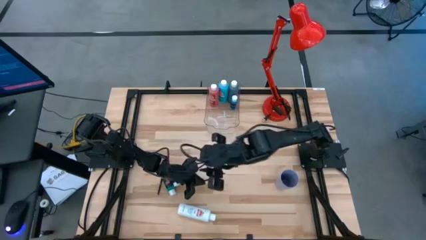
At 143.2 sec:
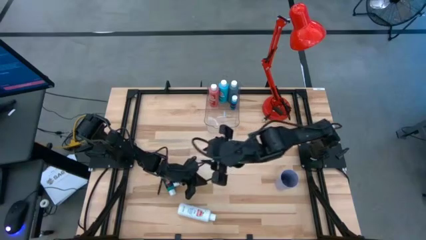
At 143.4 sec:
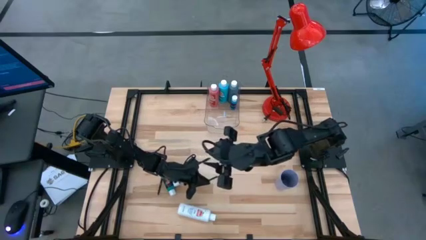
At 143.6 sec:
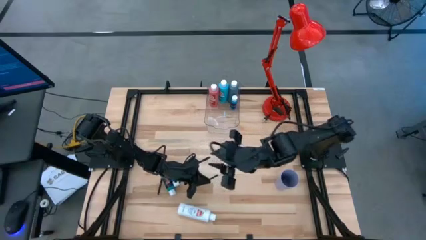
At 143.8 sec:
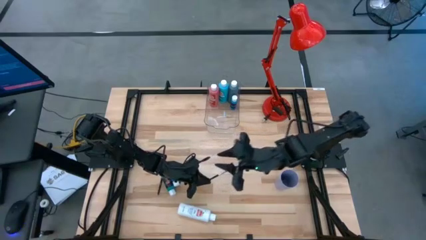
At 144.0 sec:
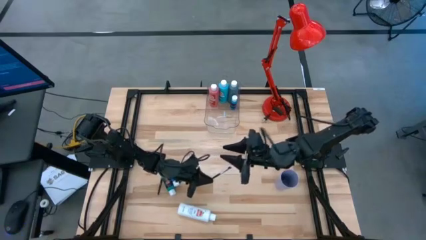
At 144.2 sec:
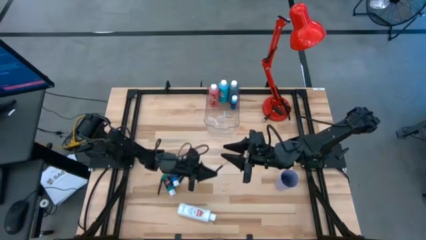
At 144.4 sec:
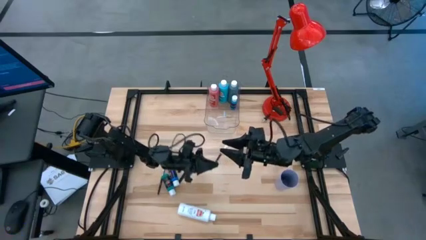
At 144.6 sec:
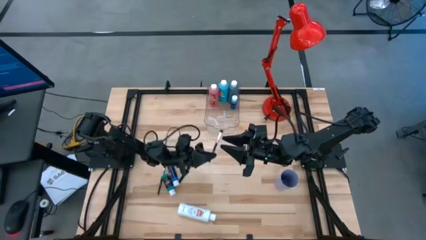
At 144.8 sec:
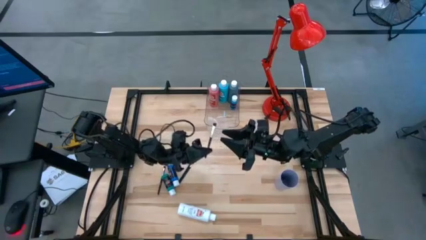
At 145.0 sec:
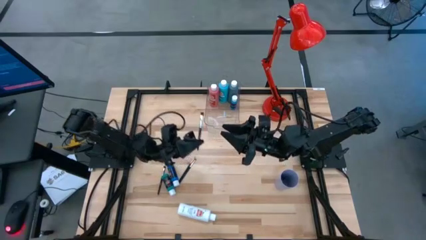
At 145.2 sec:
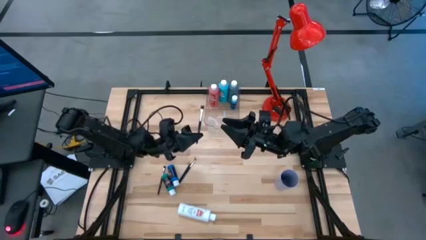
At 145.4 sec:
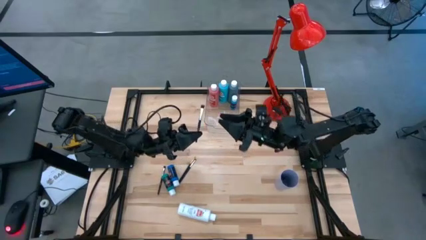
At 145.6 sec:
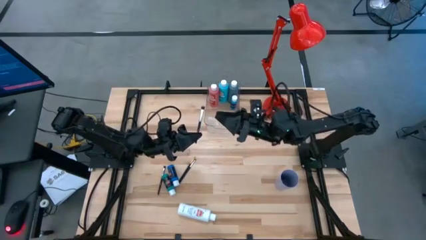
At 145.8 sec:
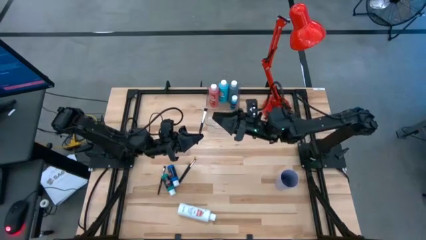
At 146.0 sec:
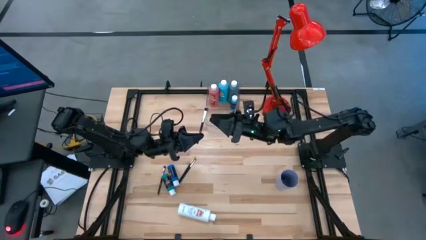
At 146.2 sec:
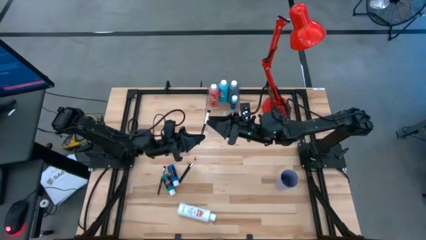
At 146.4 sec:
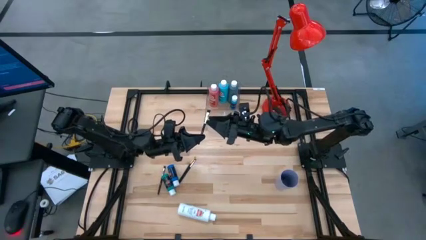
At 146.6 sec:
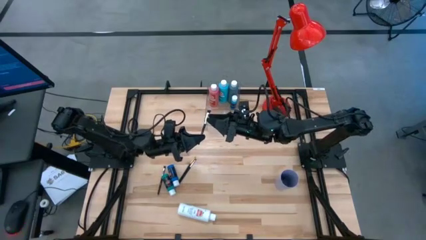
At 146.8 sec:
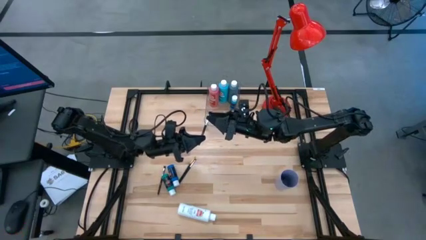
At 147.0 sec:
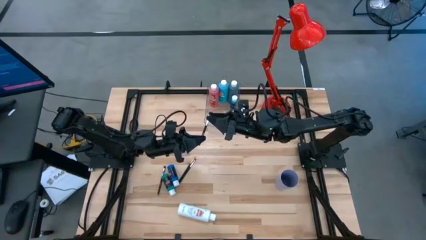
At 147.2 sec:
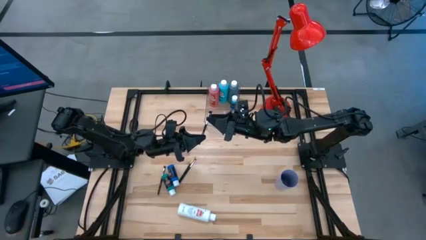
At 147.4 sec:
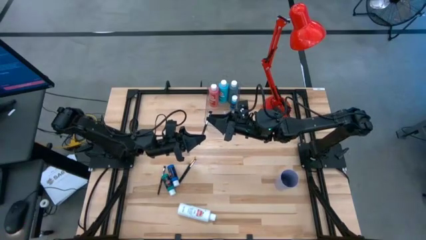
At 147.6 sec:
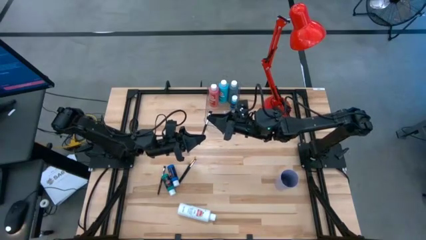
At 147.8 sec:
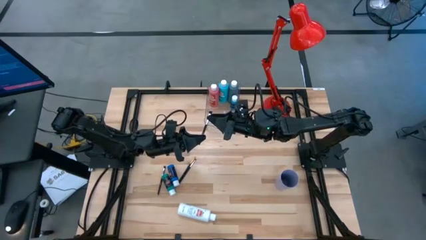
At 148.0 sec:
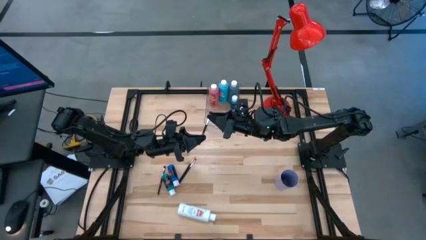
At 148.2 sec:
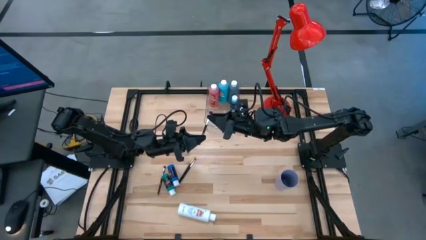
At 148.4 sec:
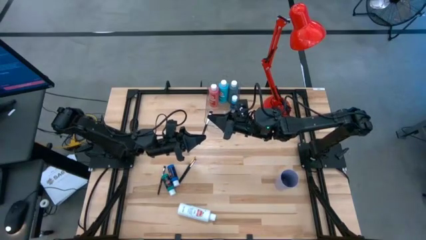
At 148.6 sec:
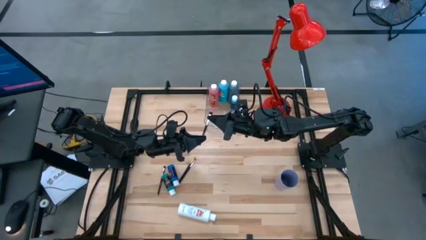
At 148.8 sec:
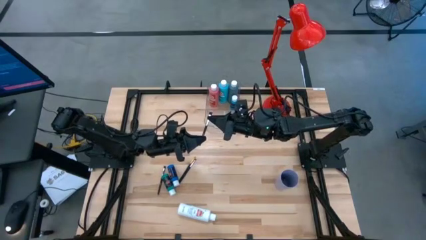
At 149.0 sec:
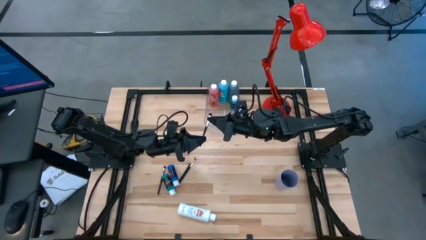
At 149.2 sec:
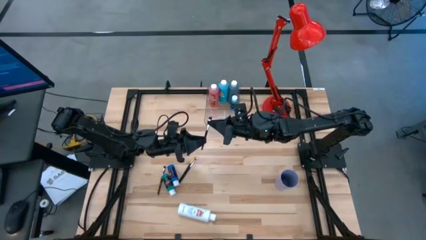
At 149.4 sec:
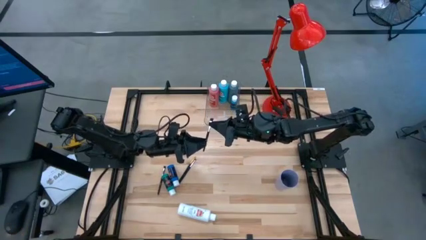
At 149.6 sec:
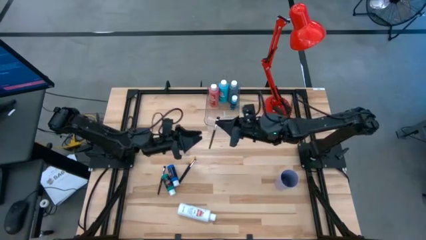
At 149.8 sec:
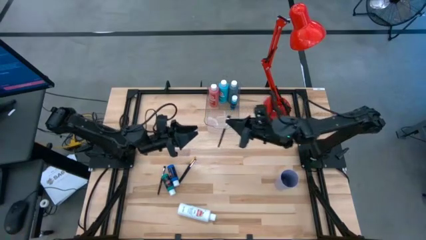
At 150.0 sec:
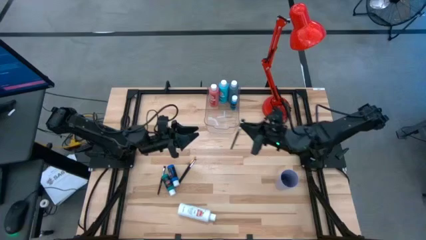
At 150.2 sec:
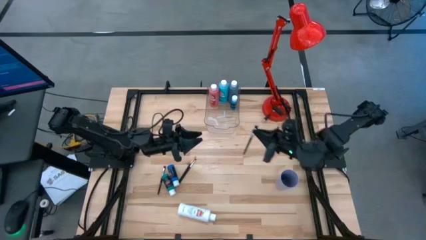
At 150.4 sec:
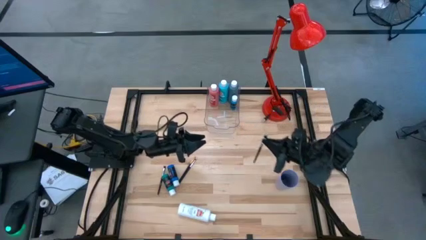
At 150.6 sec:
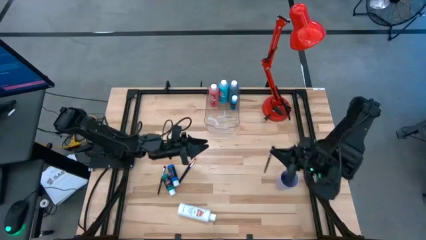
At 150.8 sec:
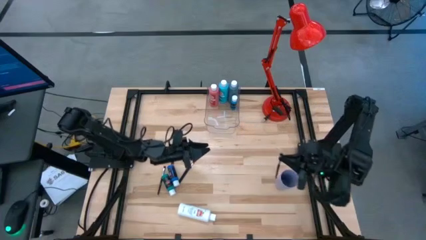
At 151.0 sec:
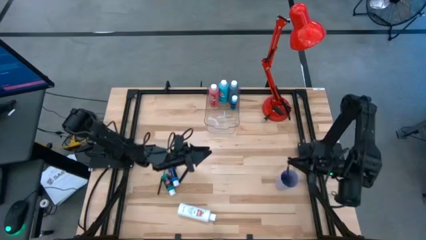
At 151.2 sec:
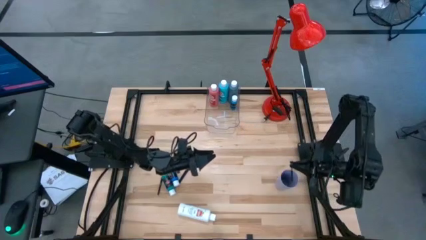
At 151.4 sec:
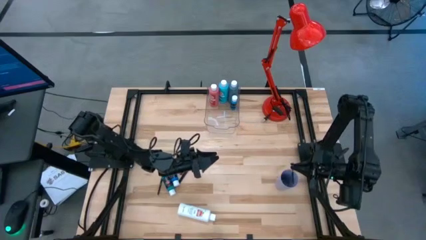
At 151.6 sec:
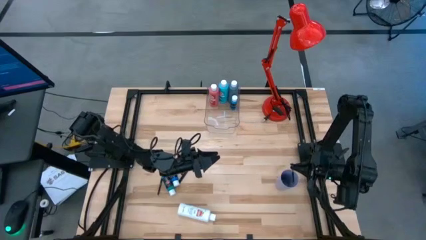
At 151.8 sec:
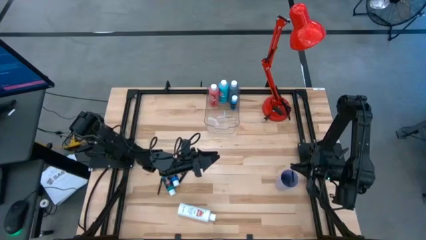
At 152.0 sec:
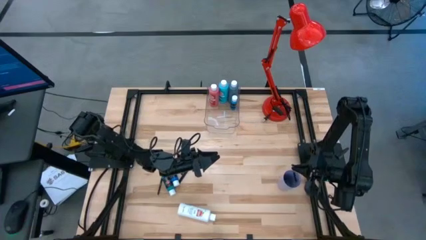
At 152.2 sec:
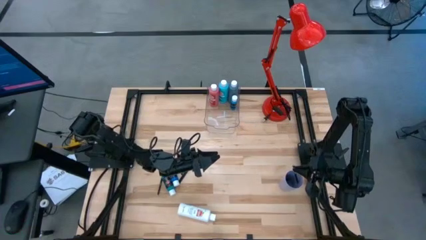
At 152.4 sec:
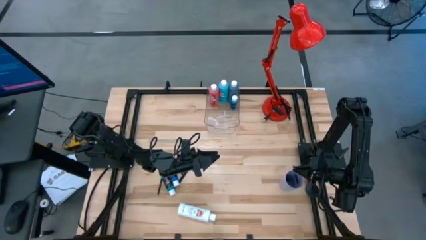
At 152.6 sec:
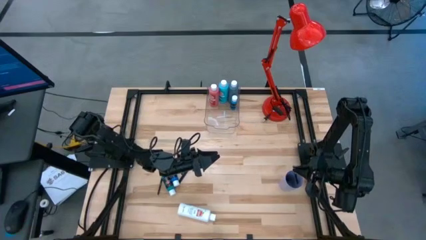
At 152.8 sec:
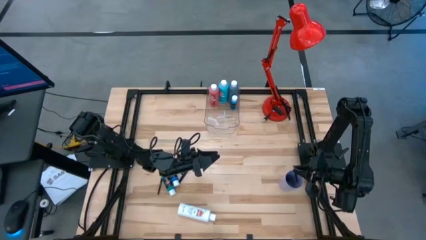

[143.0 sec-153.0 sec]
Task: Pick & Place Paint Supplies
Put the silver paintbrush into the purple cup

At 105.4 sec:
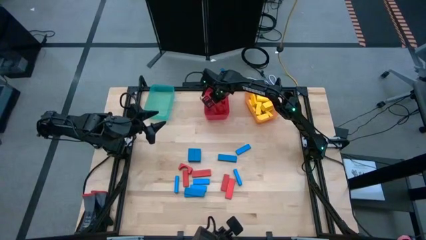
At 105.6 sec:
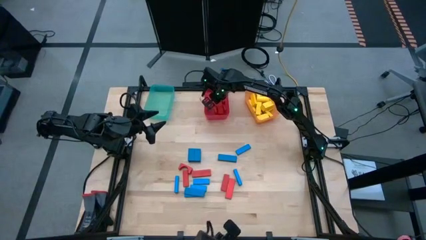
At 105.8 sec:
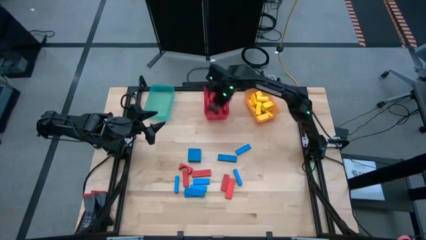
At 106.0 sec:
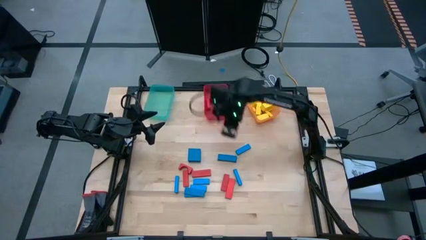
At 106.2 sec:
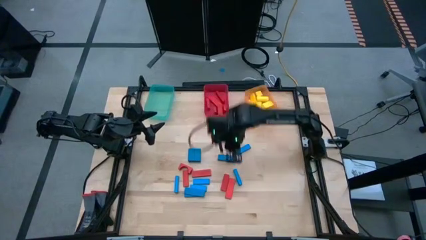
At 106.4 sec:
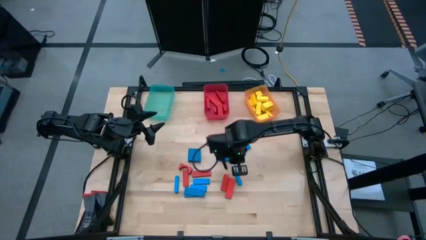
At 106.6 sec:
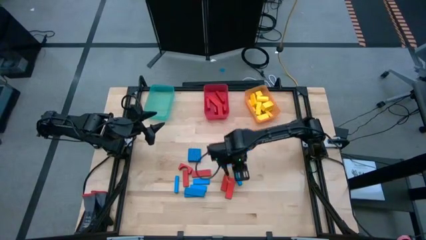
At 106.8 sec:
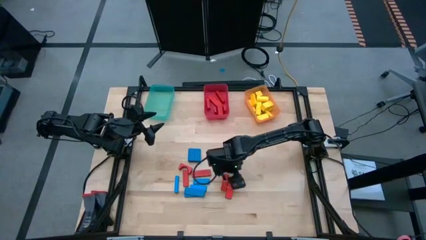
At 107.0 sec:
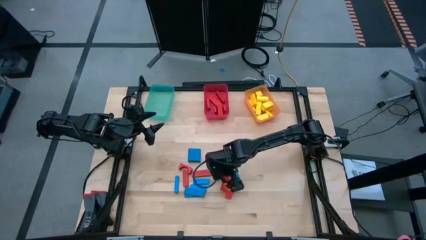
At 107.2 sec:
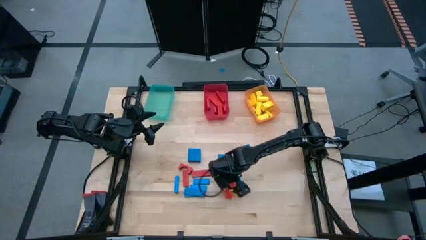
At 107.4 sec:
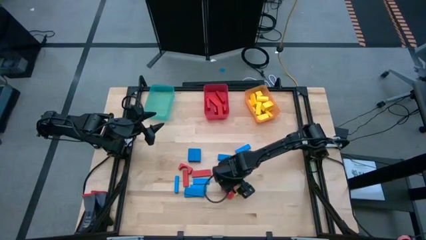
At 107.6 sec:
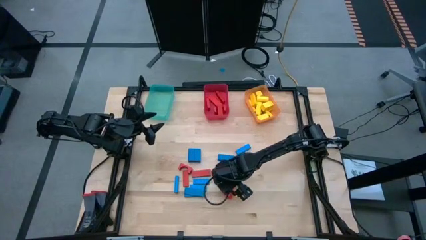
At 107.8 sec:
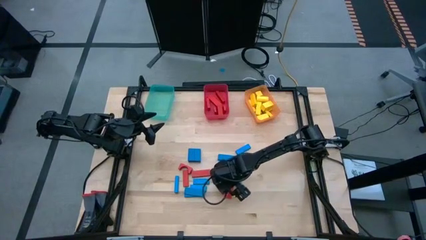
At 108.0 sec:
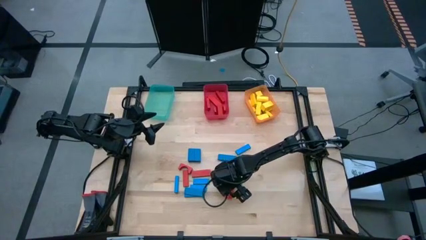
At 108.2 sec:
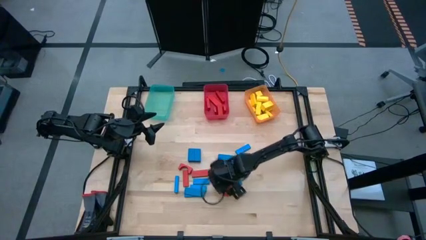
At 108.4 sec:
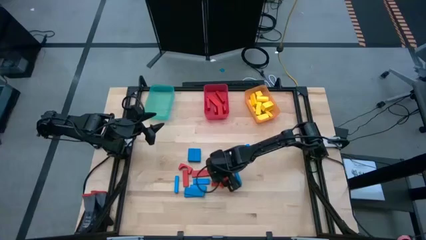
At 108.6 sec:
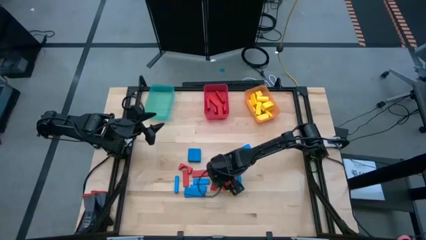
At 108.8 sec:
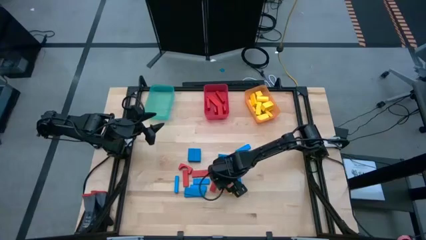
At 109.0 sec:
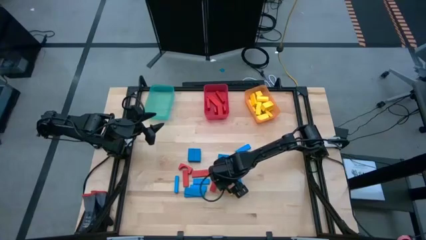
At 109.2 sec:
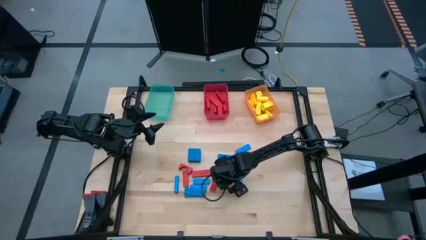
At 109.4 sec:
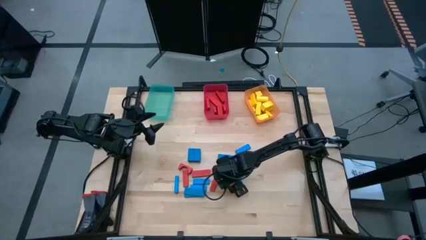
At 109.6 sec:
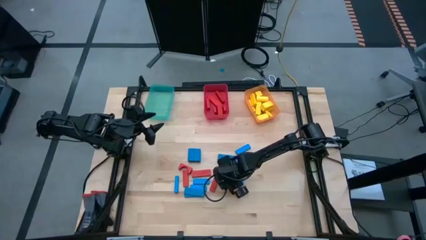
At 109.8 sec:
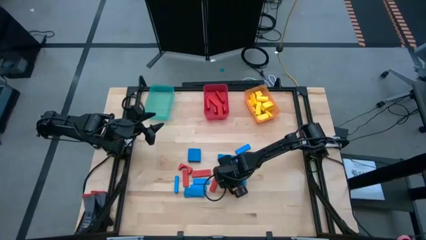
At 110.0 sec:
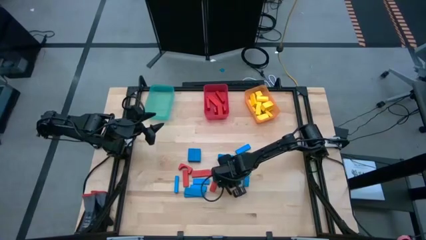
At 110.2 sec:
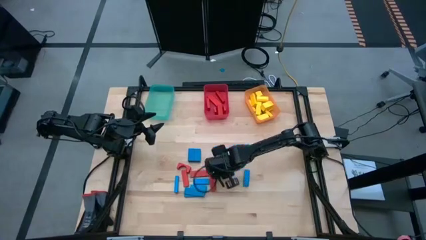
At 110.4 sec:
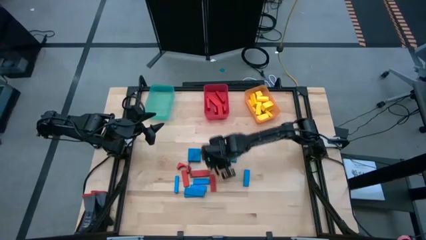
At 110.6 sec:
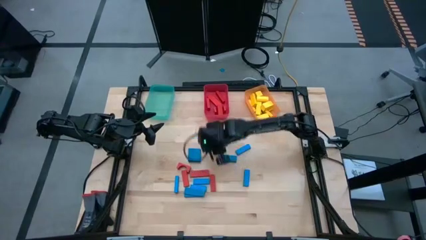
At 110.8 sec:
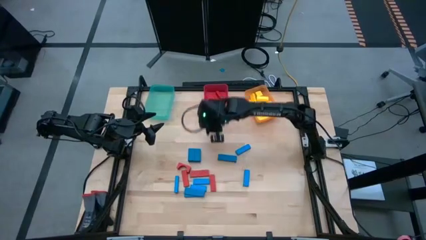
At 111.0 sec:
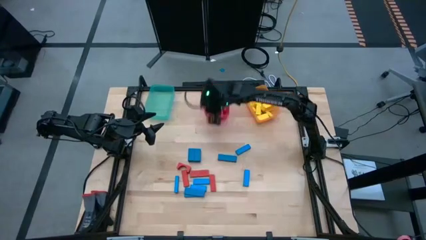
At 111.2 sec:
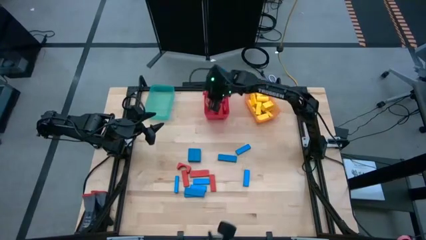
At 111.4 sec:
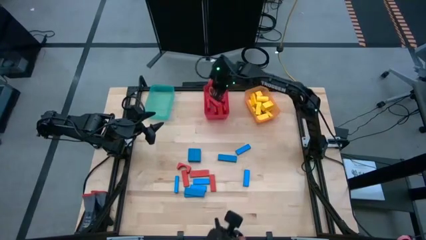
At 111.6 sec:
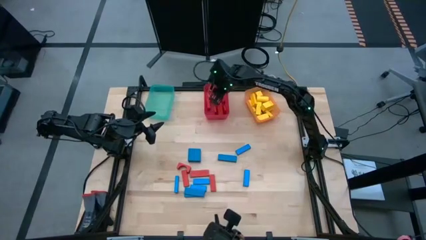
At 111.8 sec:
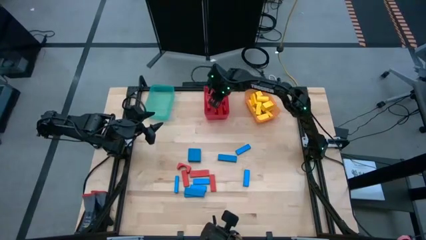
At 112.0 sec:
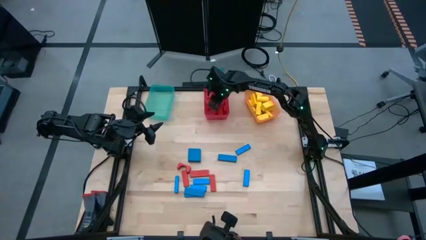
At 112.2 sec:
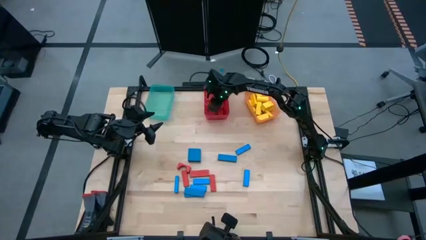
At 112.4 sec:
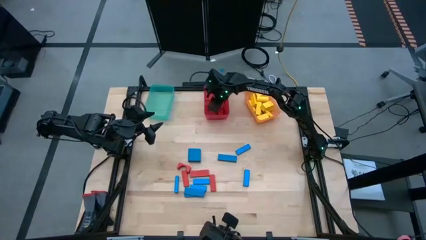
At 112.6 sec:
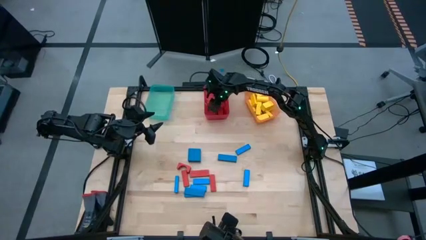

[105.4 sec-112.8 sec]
Task: Sort blocks
Put the red block into the red bin
